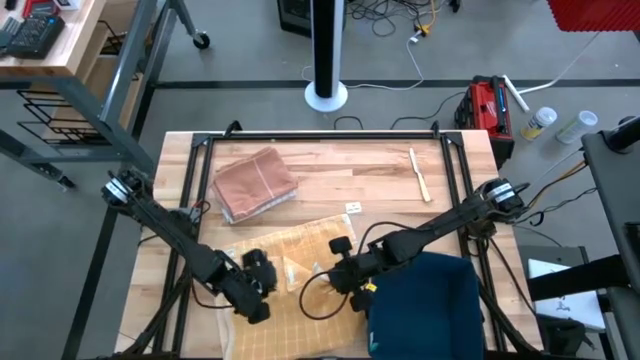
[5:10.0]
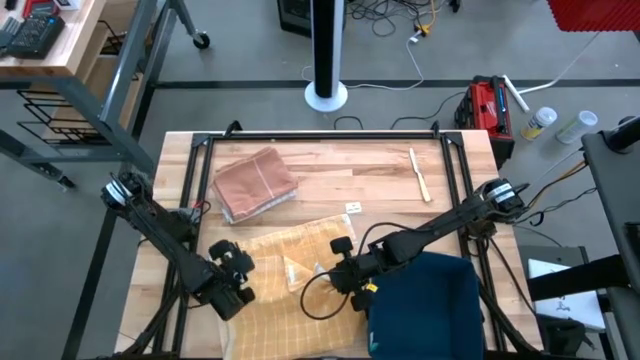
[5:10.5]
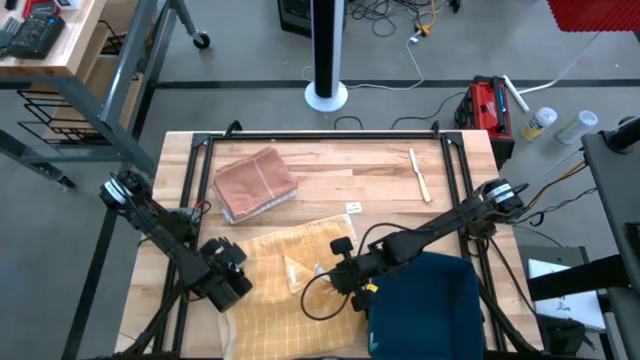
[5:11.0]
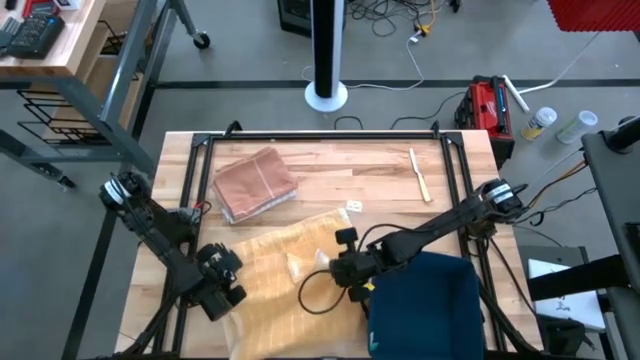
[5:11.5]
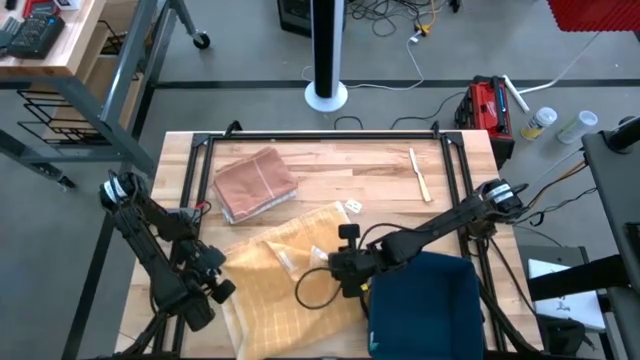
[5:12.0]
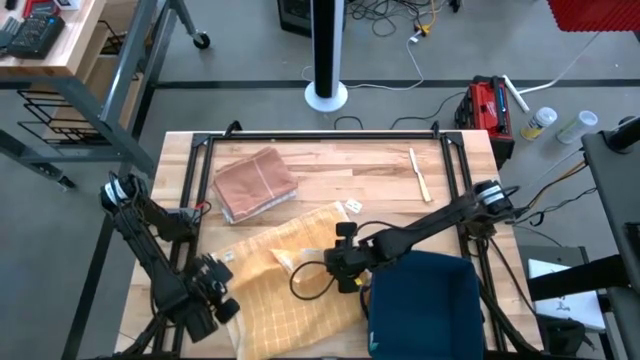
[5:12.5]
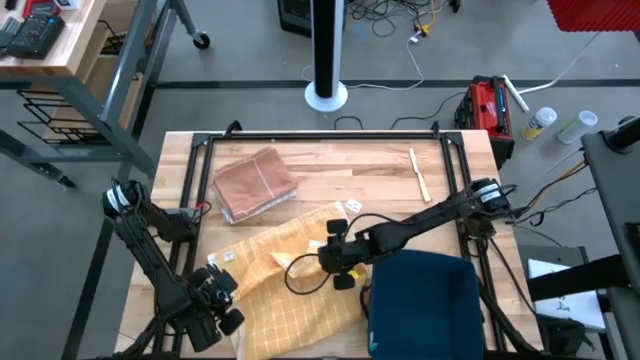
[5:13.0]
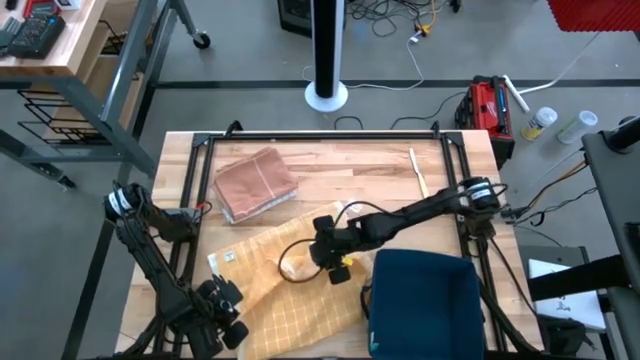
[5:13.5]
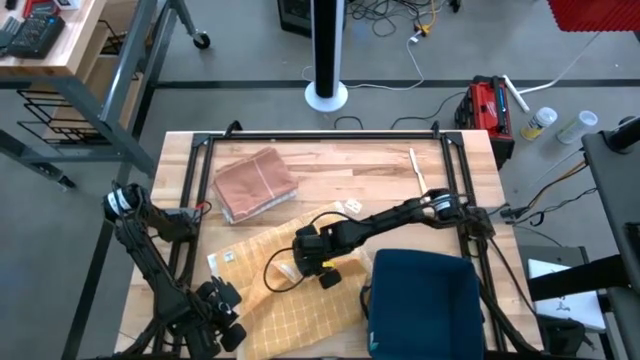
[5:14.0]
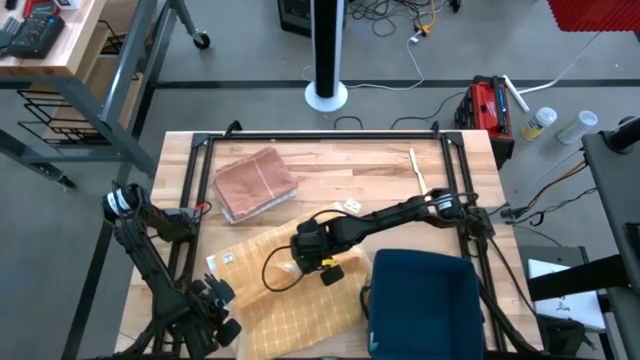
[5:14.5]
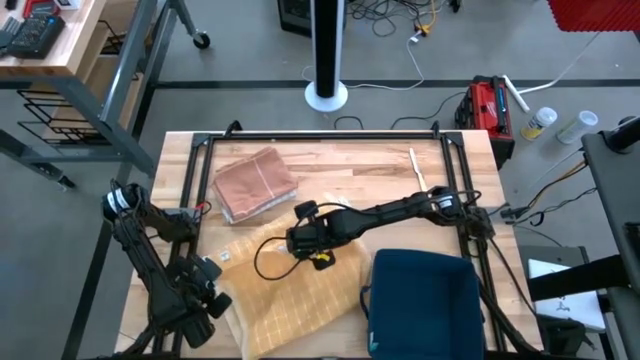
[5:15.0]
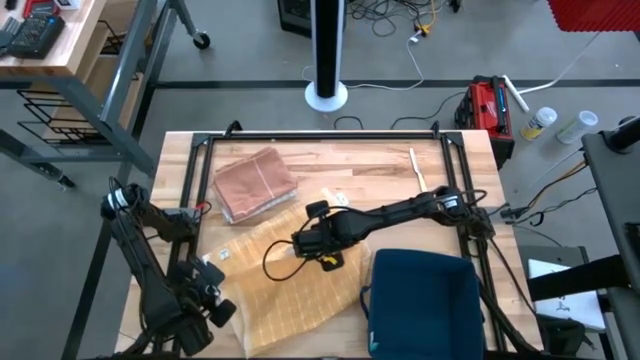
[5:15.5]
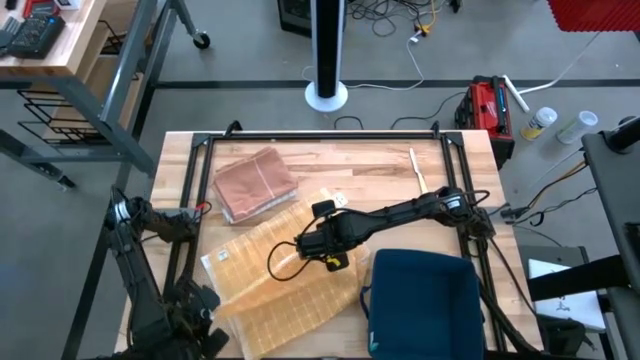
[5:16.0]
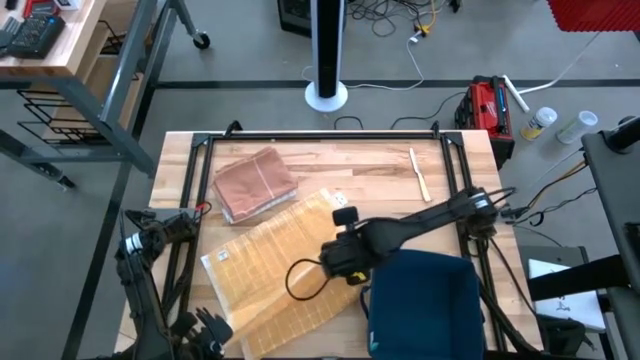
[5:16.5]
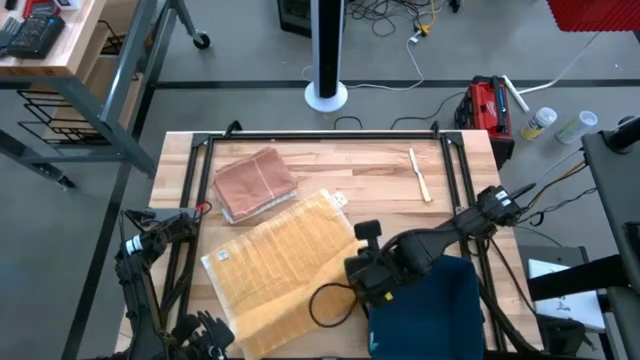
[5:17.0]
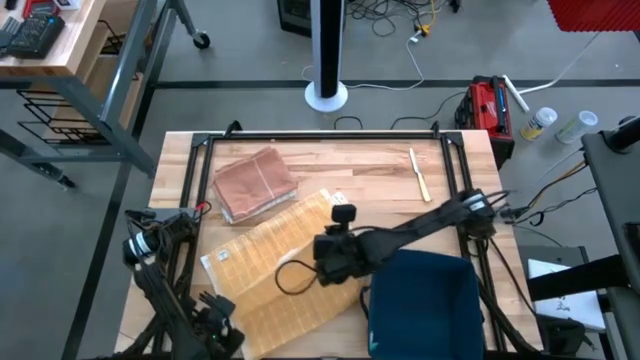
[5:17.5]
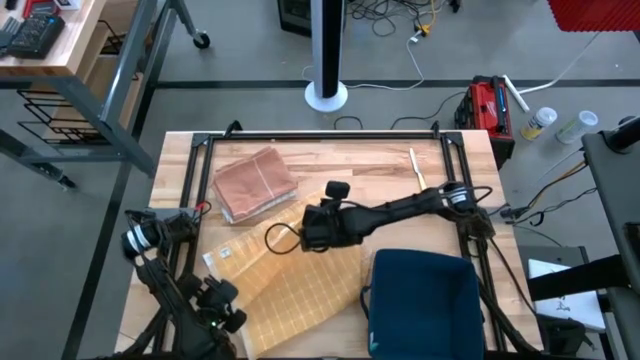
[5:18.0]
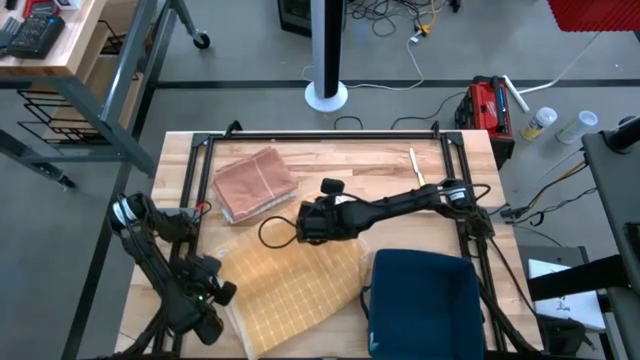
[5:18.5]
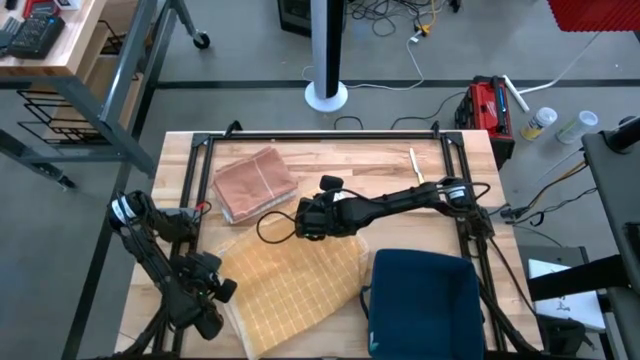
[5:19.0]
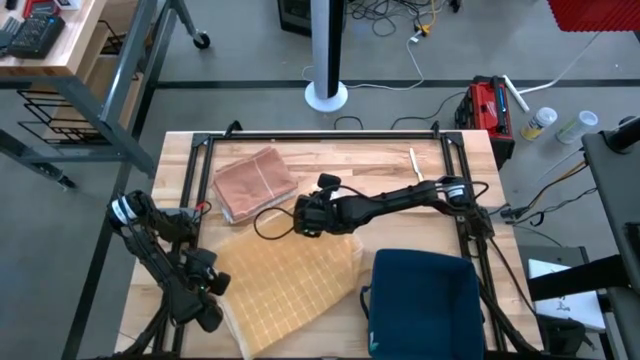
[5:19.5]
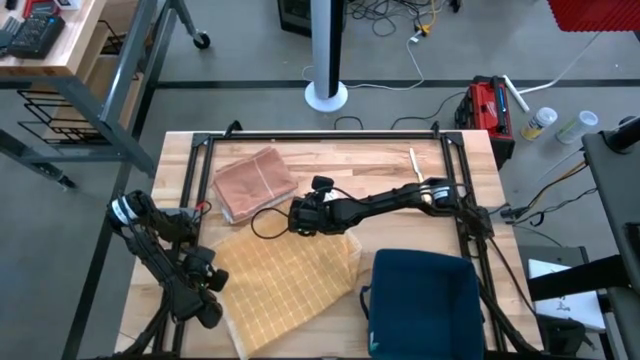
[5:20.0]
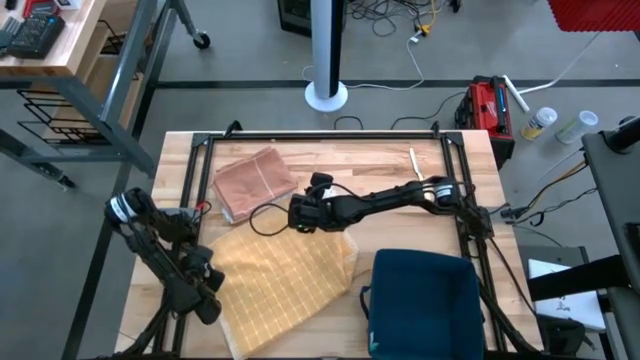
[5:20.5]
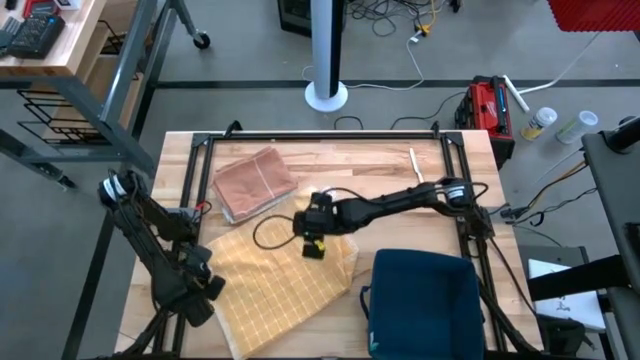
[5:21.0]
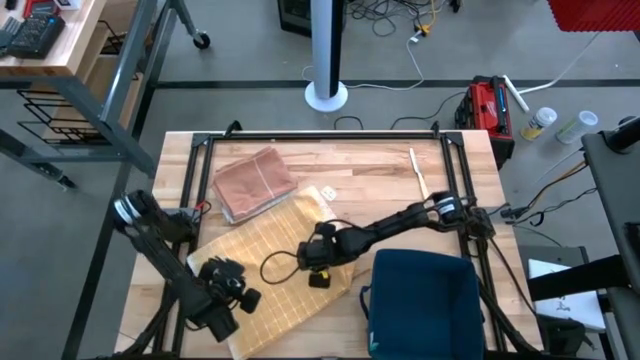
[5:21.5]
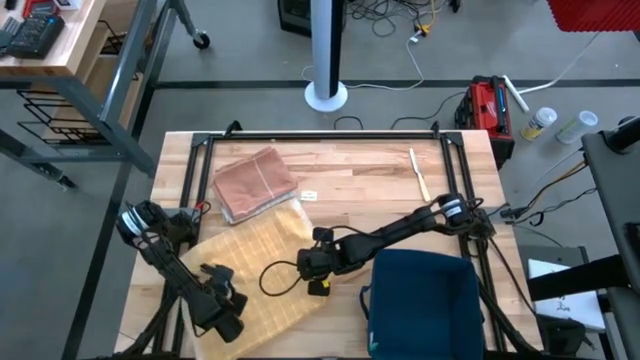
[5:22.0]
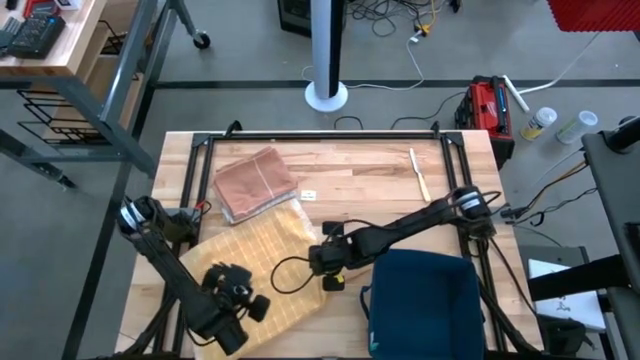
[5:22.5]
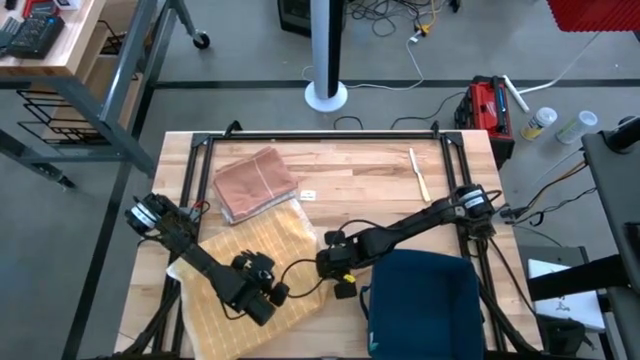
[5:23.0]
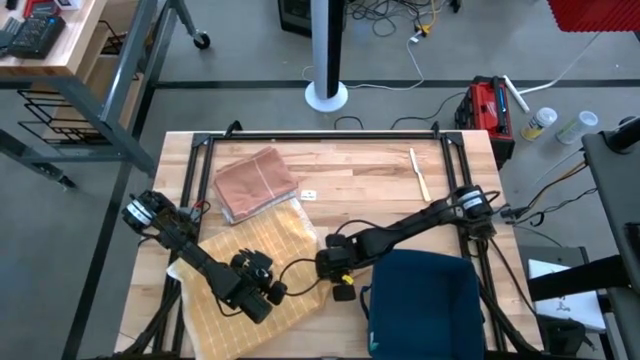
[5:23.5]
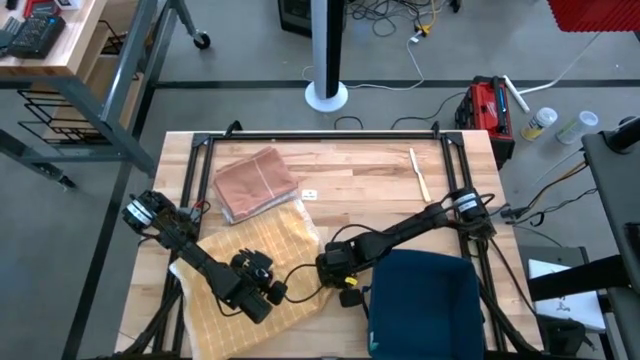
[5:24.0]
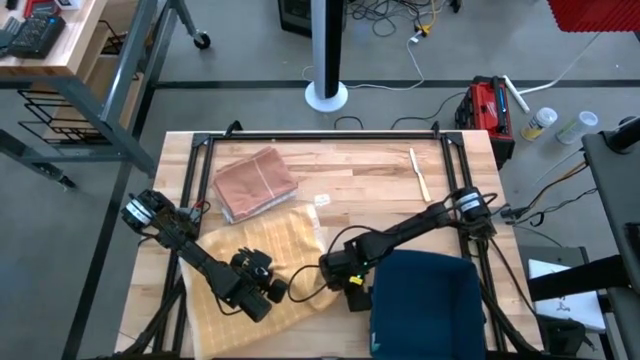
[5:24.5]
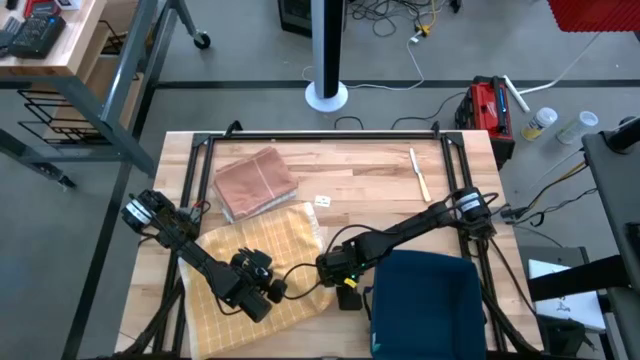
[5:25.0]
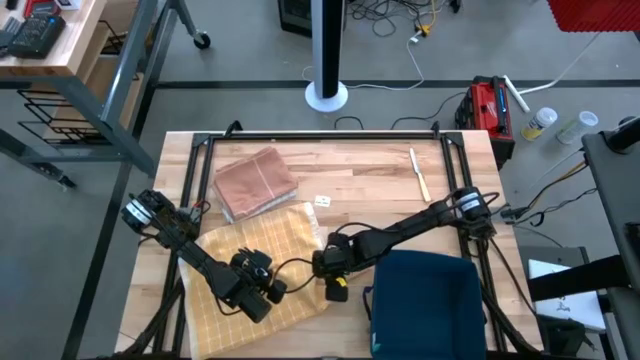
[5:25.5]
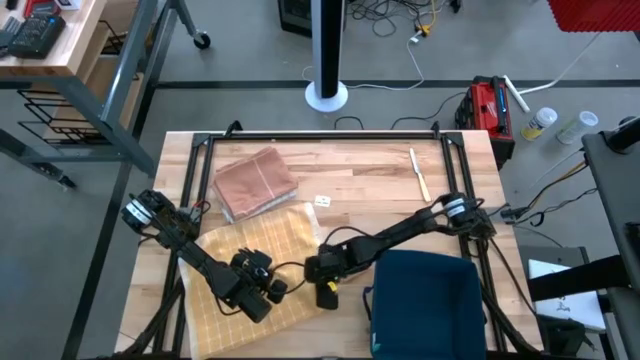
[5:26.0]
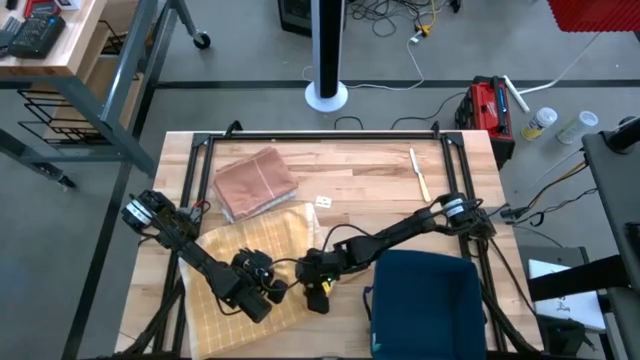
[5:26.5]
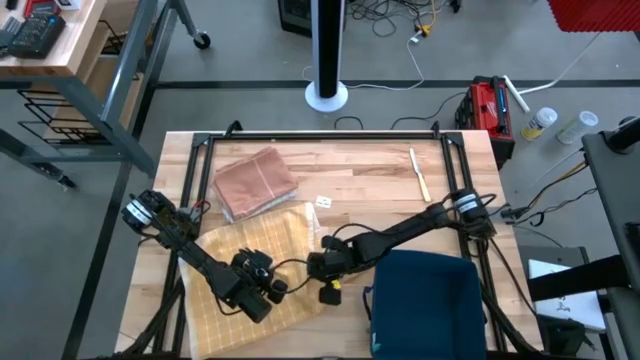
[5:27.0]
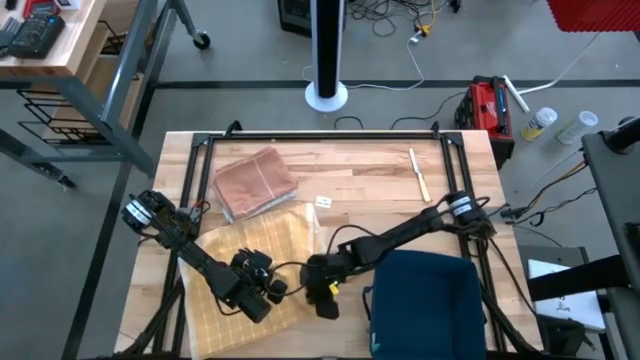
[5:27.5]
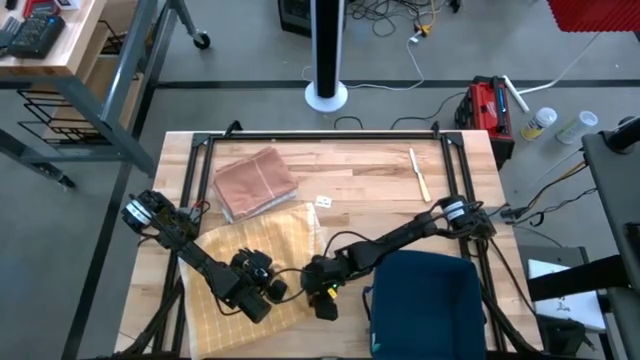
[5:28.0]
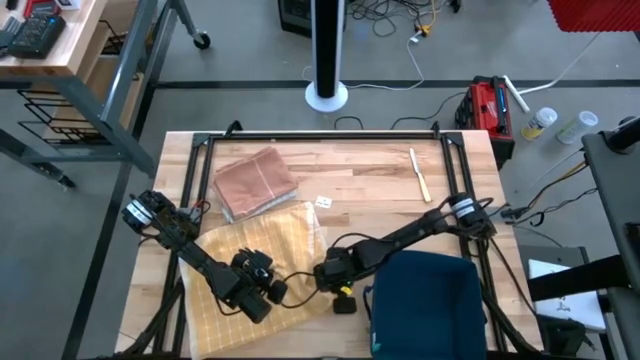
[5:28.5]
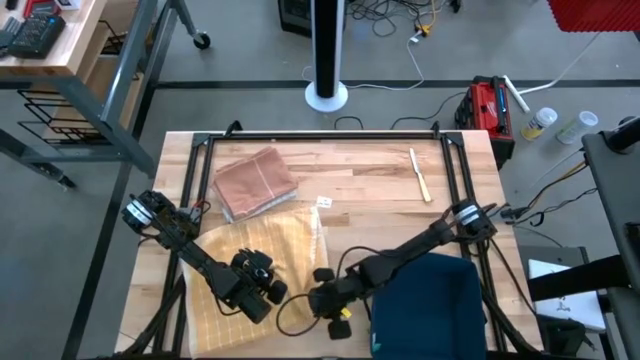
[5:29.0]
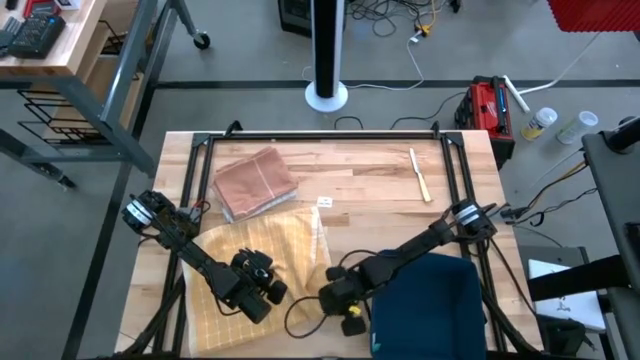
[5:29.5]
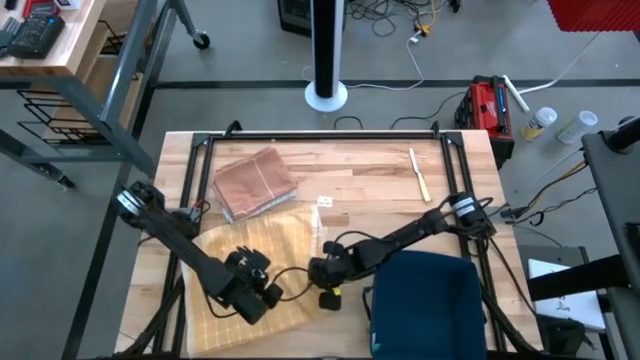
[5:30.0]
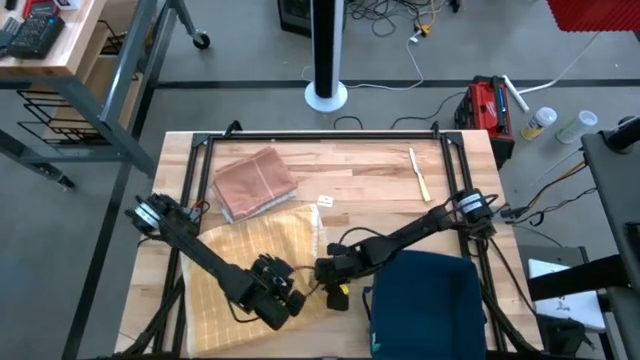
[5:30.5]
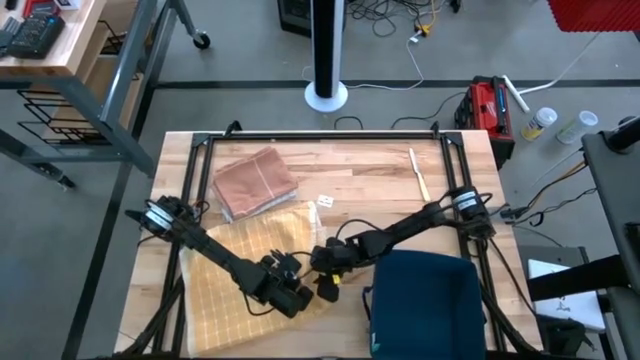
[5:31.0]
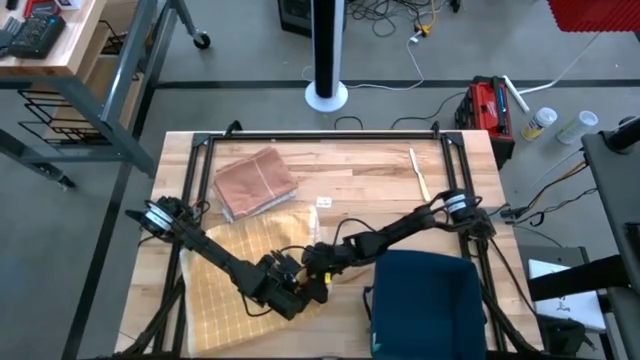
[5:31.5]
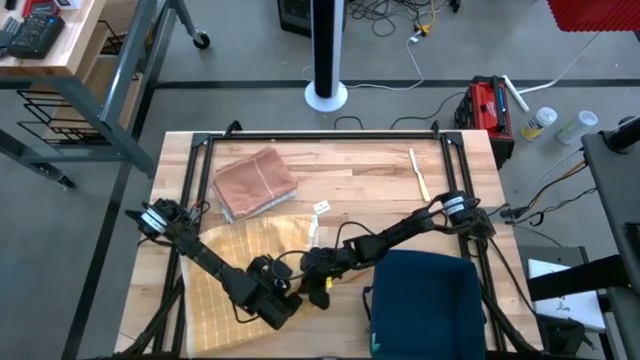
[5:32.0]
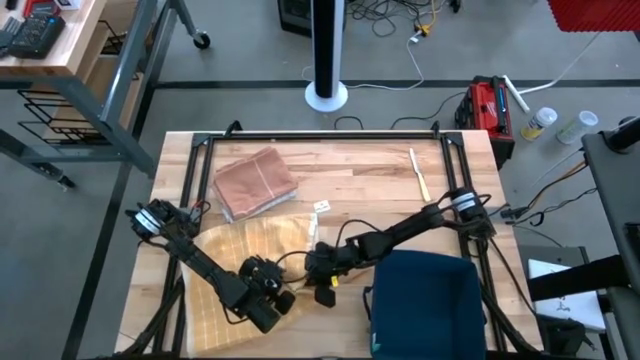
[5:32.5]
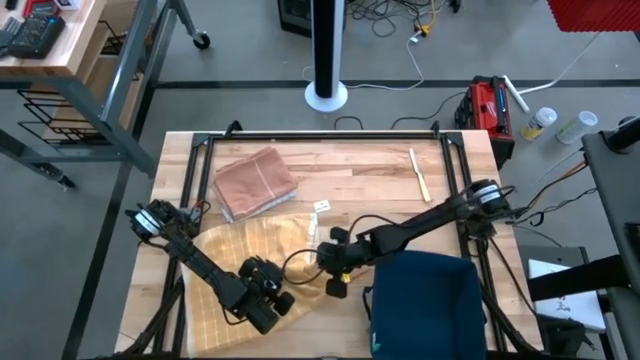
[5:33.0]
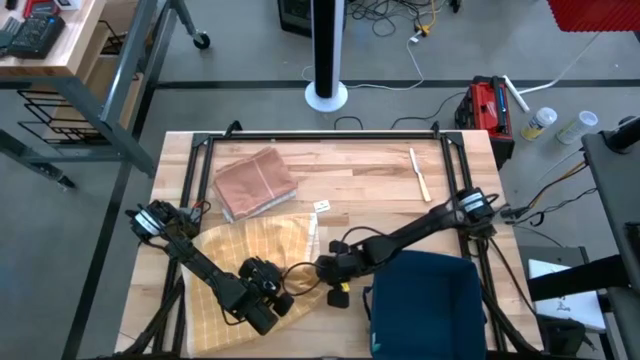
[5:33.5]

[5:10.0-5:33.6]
Task: Fold towel
Fold the yellow towel
